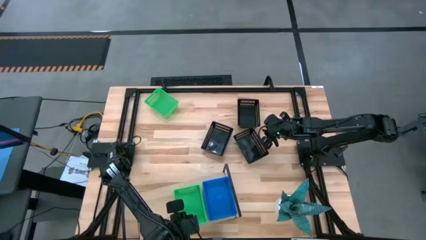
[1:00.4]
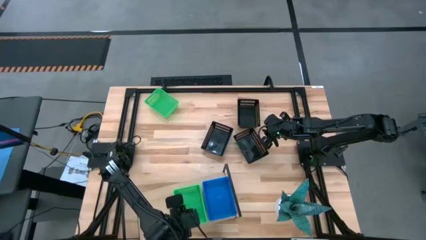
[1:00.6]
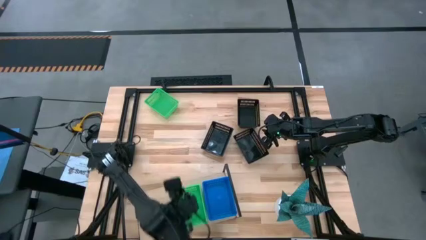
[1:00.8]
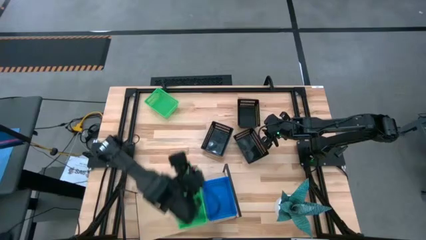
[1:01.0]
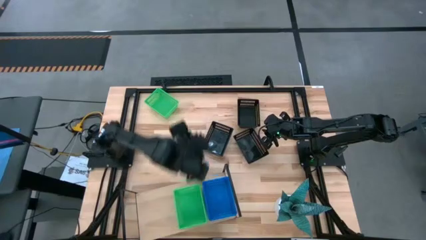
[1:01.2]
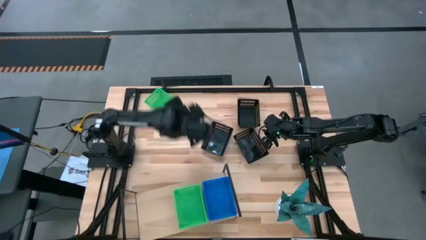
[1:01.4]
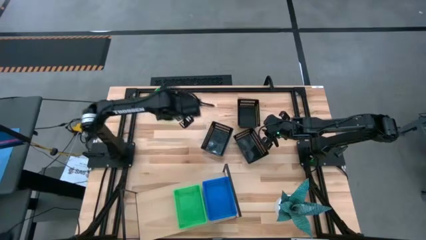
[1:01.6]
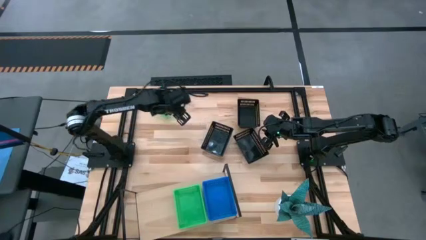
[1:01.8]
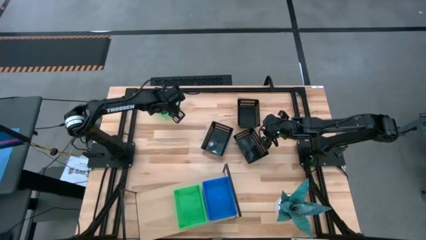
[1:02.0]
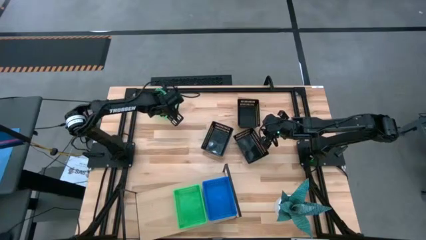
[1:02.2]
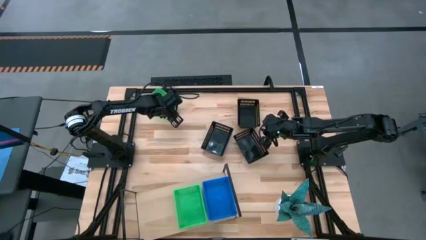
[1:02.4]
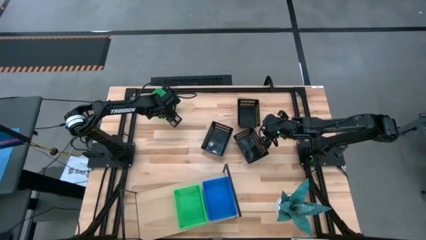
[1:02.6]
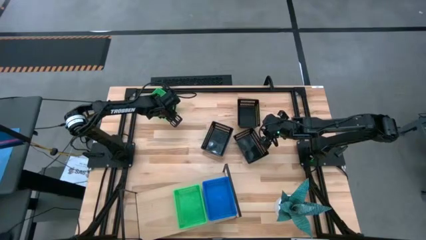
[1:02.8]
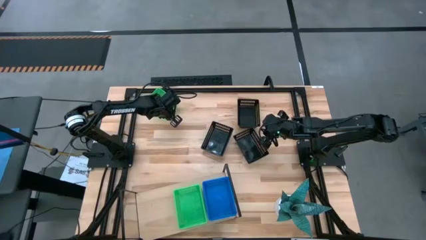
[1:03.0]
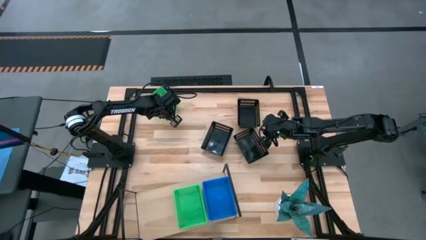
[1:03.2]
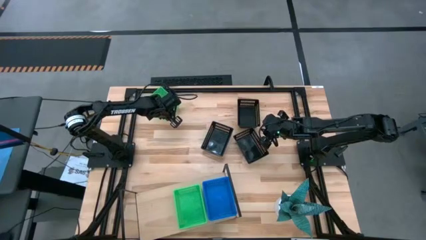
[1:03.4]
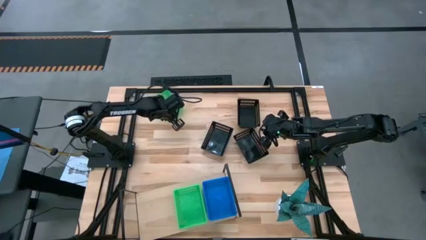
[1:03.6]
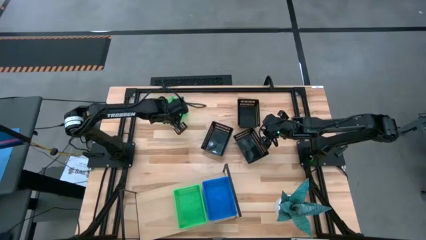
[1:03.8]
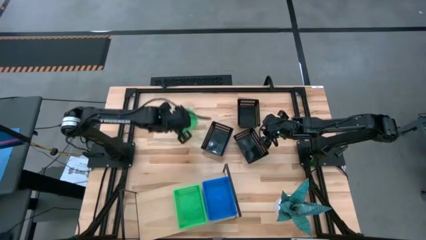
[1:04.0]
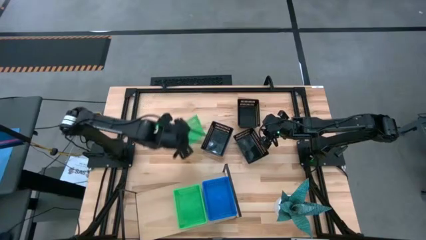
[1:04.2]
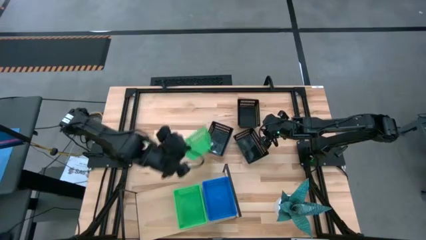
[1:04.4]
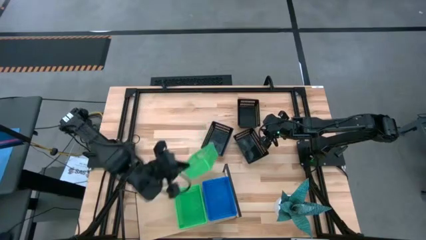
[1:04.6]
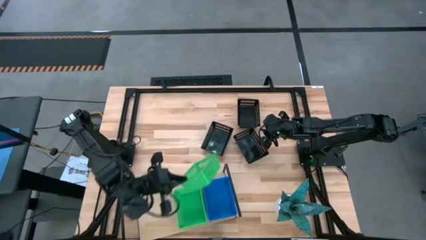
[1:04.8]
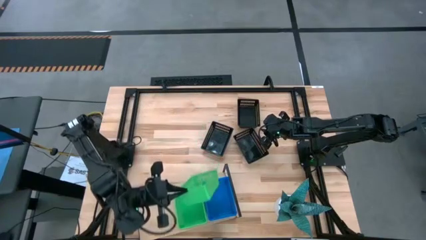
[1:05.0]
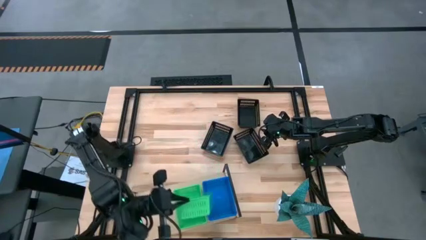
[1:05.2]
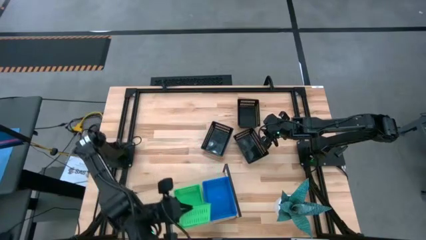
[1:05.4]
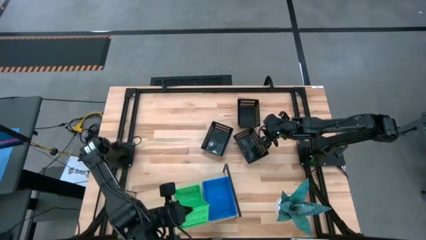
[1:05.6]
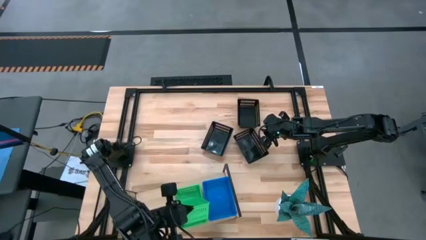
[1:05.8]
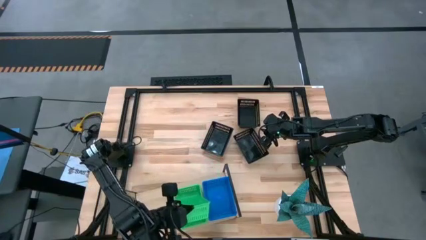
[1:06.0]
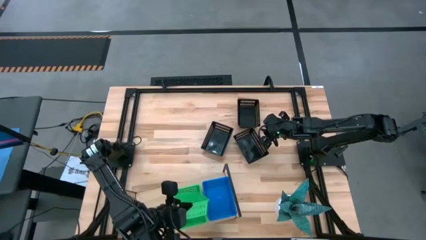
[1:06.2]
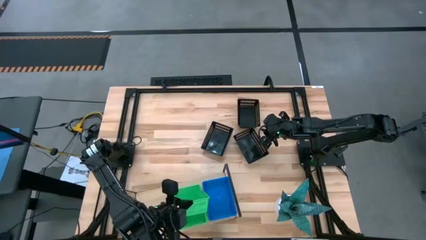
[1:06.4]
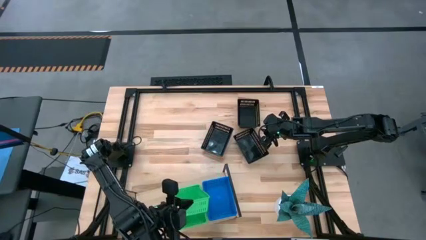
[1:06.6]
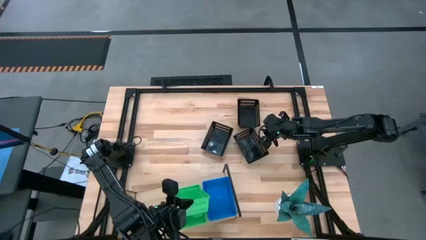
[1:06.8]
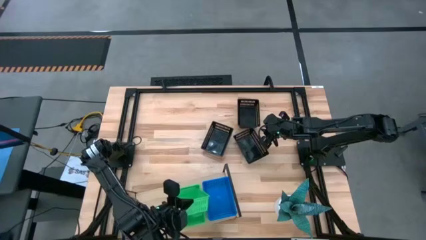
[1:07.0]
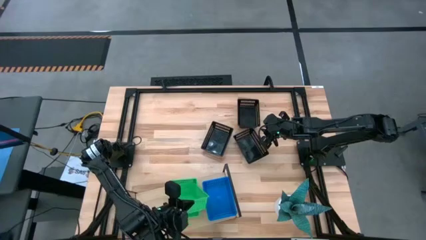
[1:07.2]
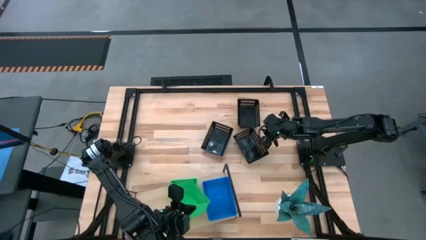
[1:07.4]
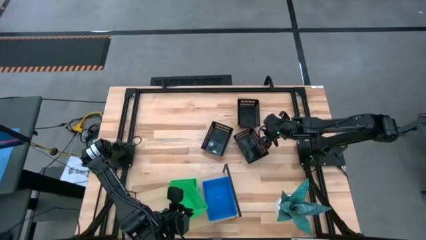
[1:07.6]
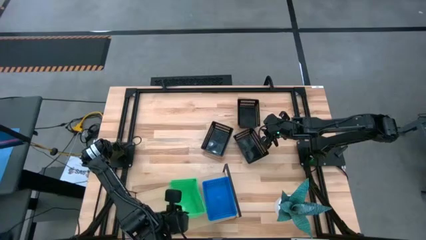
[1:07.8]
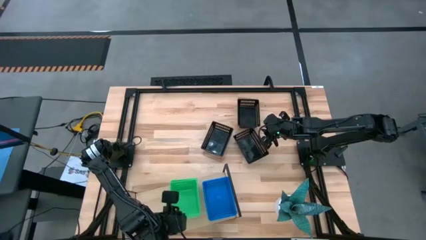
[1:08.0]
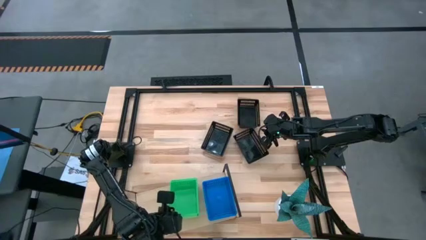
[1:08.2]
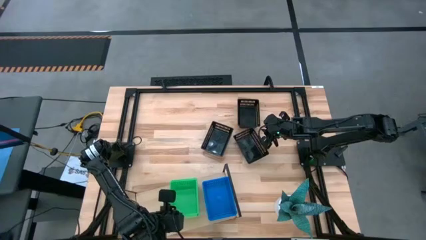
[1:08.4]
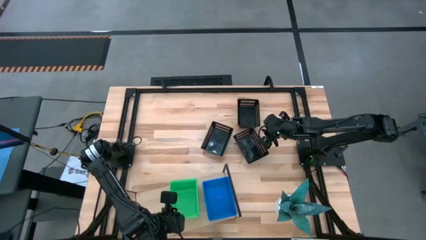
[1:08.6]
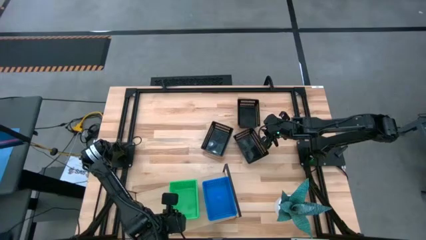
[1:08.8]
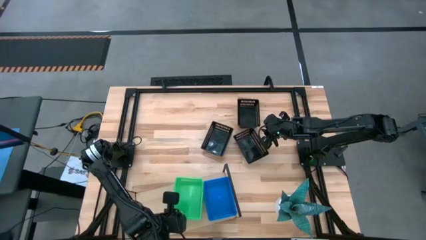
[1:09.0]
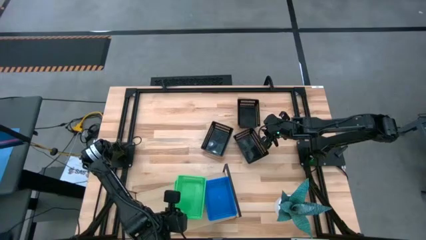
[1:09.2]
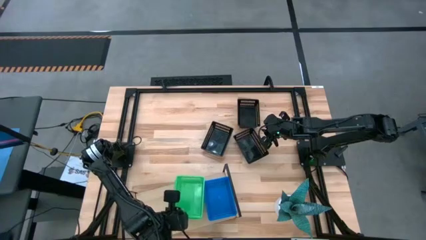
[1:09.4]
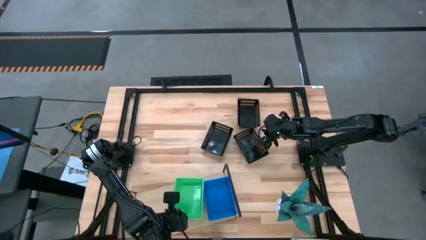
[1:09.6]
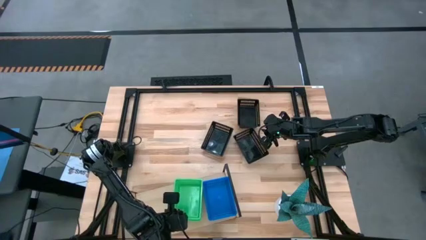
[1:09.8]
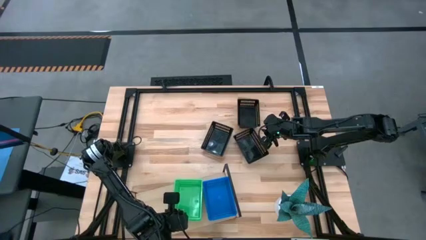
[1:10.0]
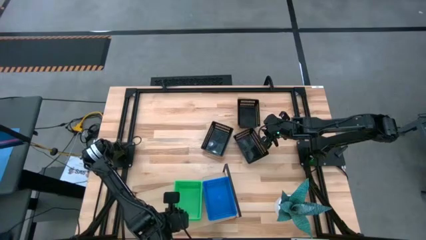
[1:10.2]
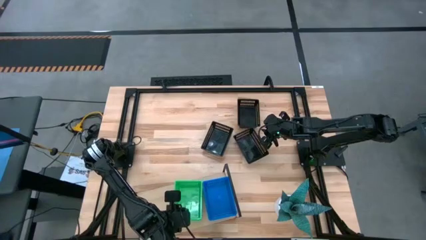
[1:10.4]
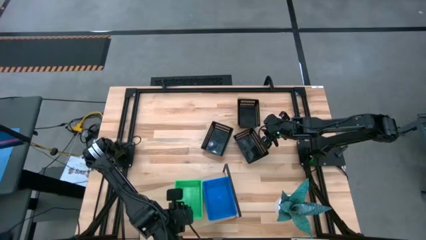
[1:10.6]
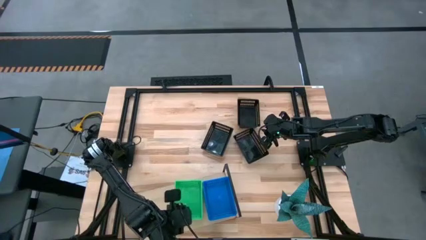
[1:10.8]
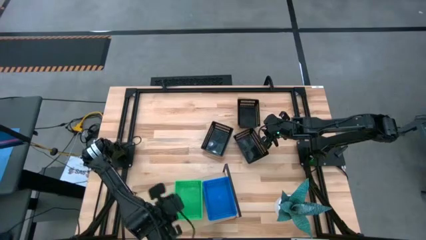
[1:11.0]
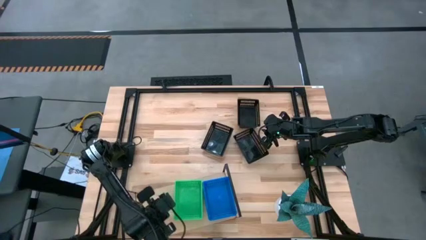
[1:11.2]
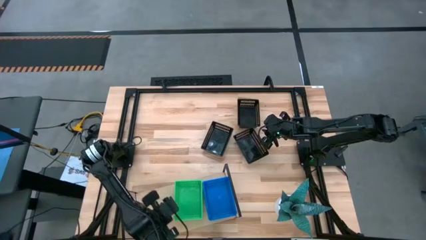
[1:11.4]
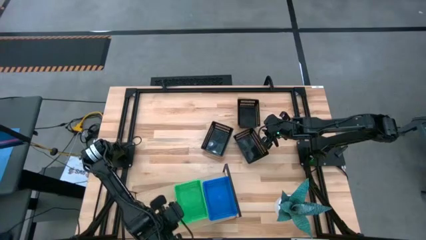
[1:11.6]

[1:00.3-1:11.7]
Task: Stack baskets on shelf by color
Stack the green basket on top of the stacked green basket

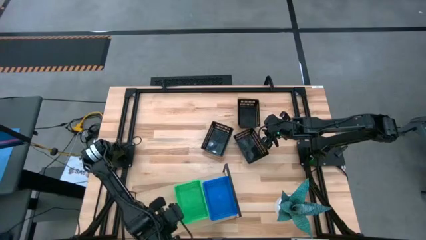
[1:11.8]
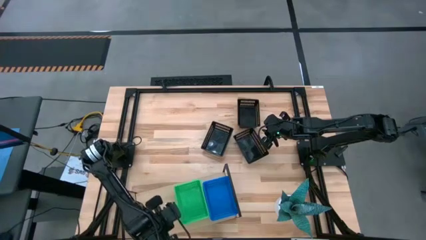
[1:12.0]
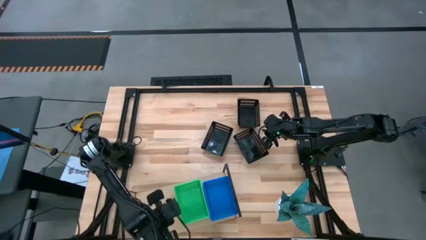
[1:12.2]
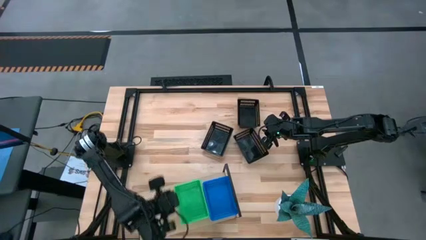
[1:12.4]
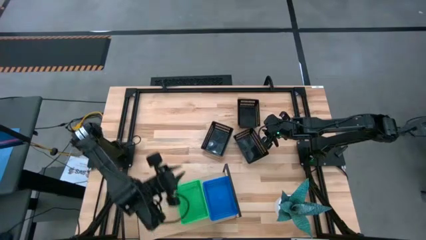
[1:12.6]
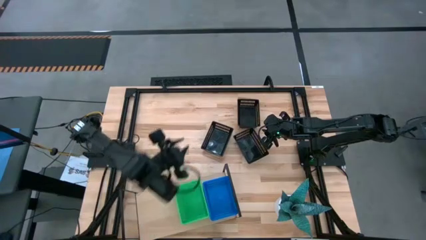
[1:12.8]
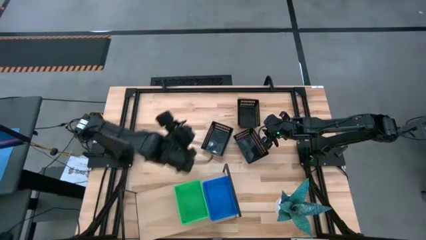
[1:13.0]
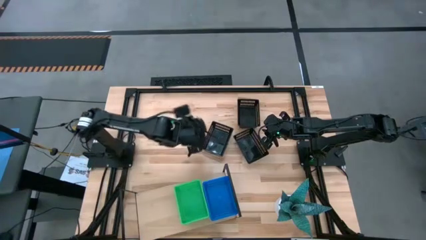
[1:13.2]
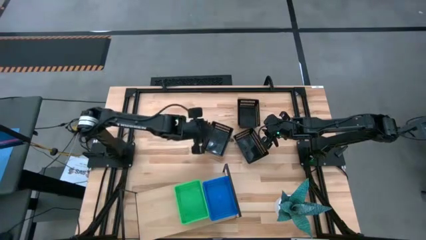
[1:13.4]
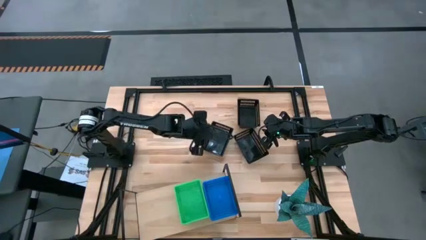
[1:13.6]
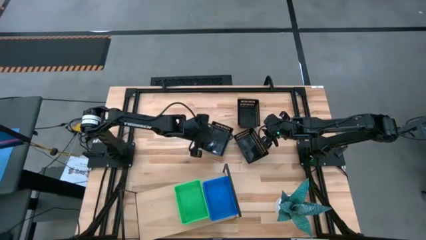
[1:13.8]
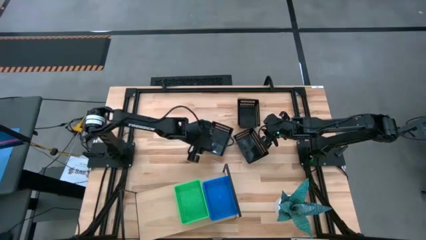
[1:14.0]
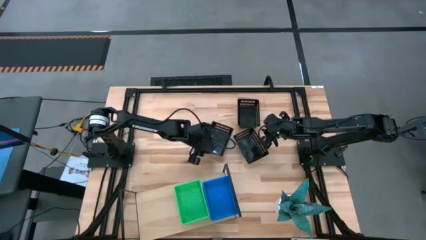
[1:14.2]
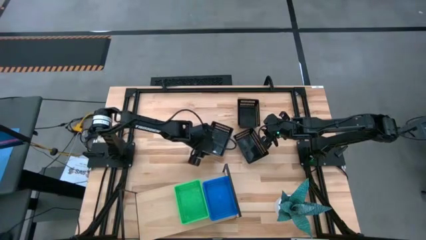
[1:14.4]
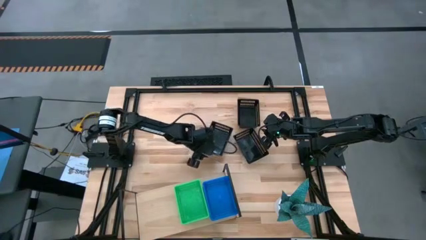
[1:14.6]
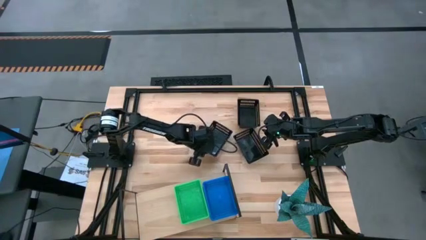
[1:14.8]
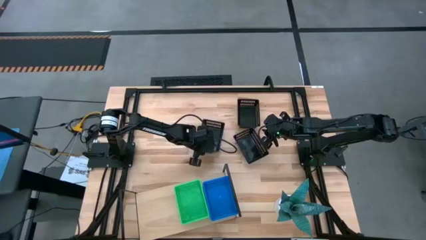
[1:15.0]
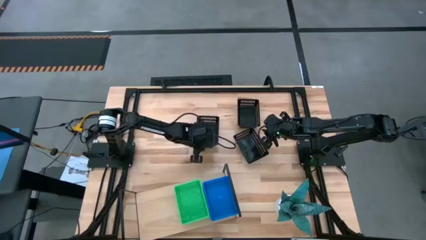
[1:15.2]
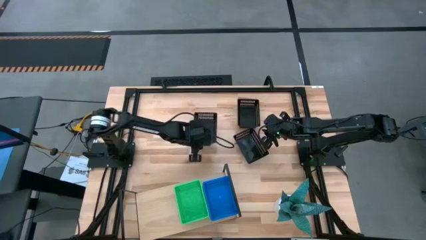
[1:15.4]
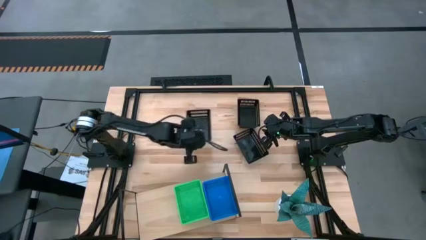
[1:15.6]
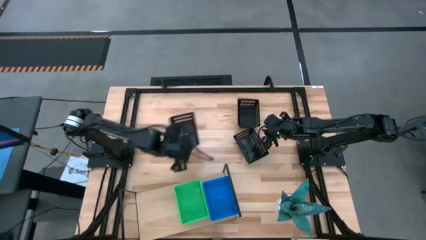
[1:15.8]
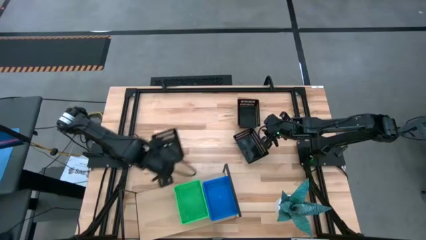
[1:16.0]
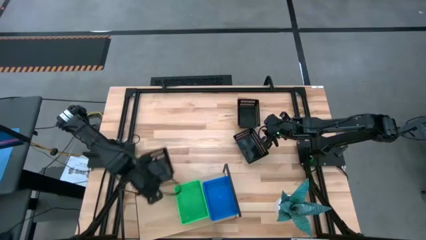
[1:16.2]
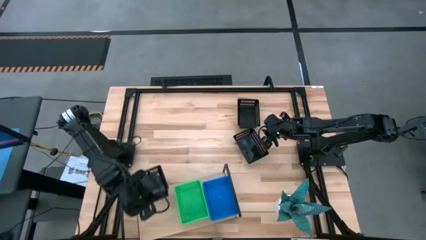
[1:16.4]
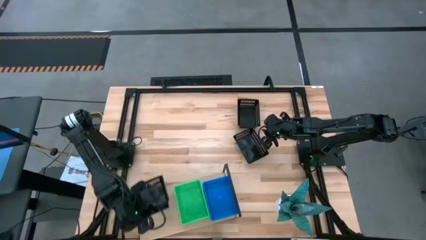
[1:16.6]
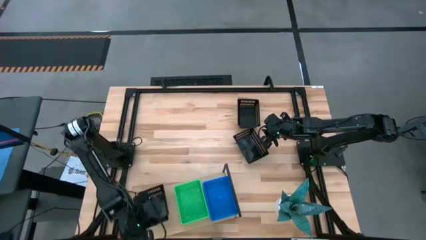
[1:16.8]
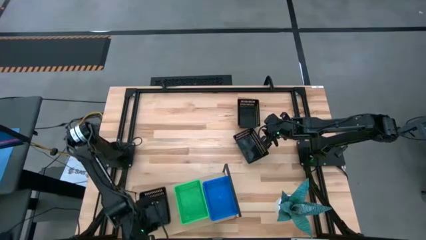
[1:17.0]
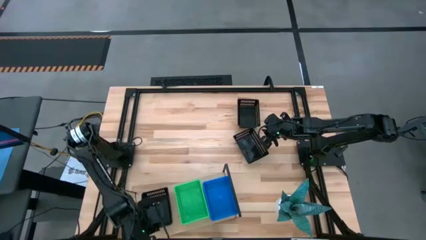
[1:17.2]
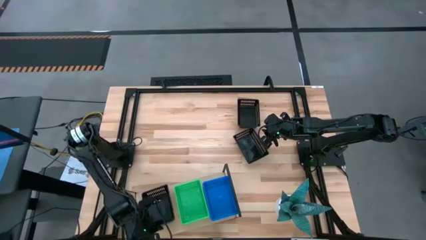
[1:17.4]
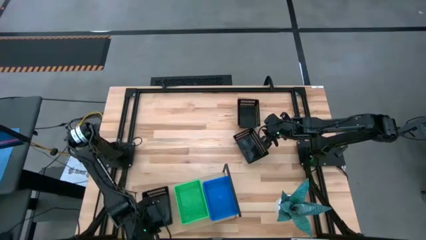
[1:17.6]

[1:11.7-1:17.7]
Put the left black basket on the shelf
